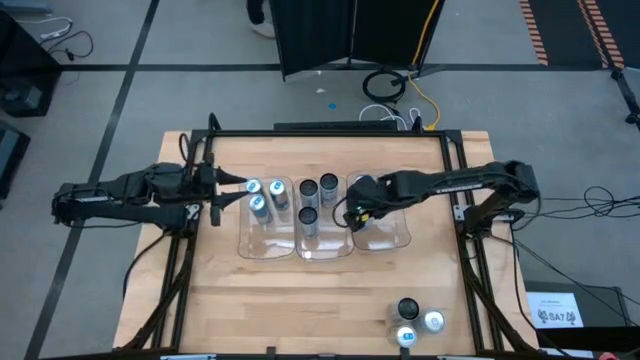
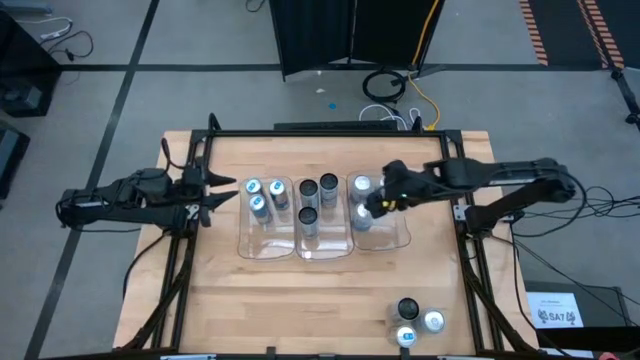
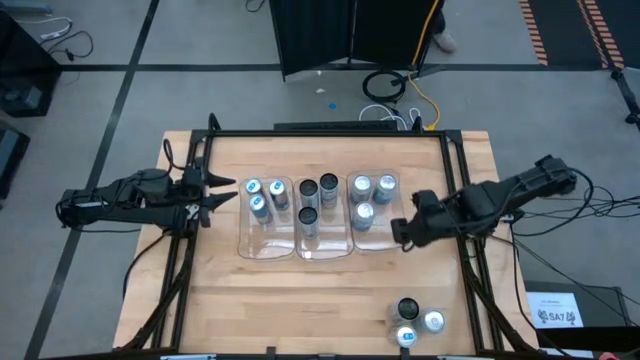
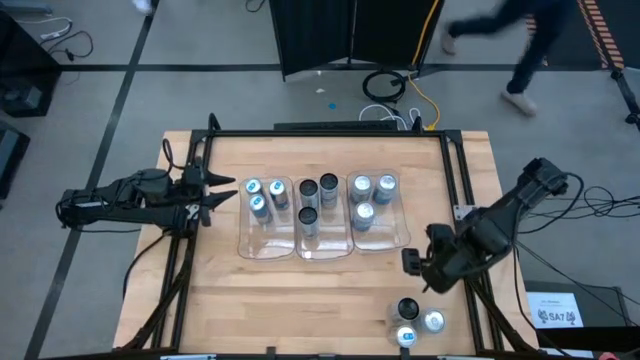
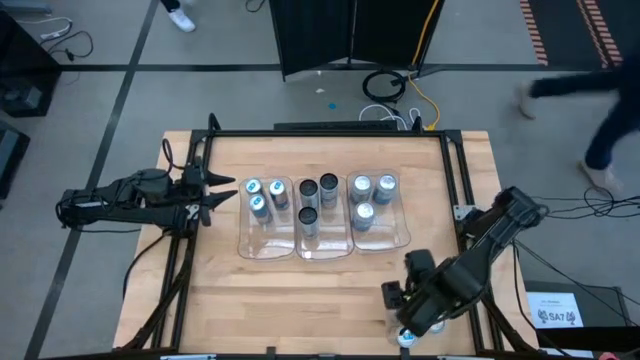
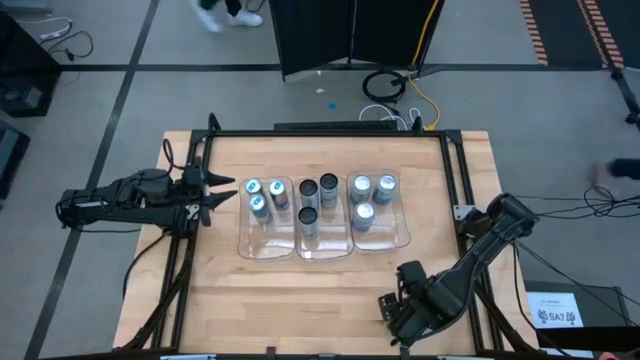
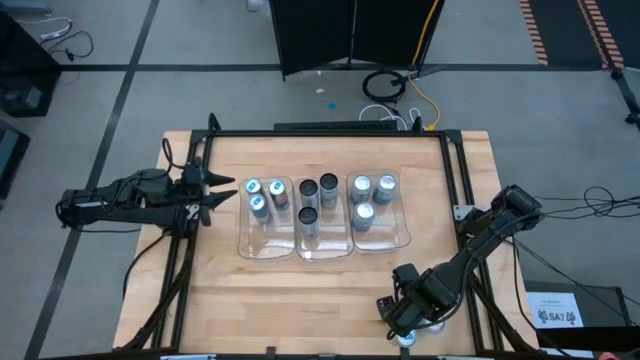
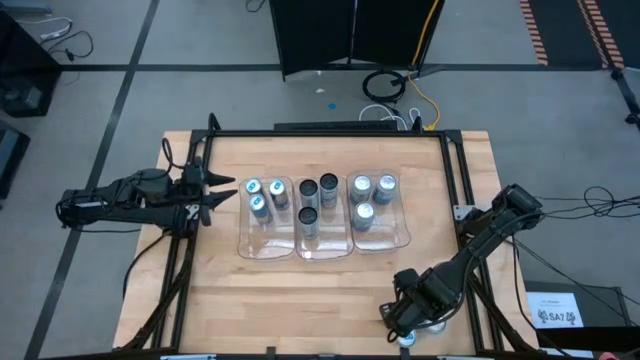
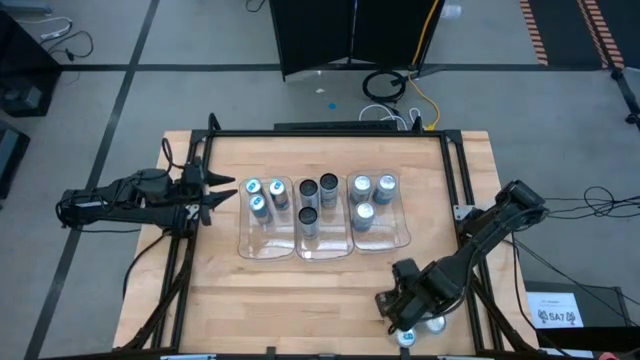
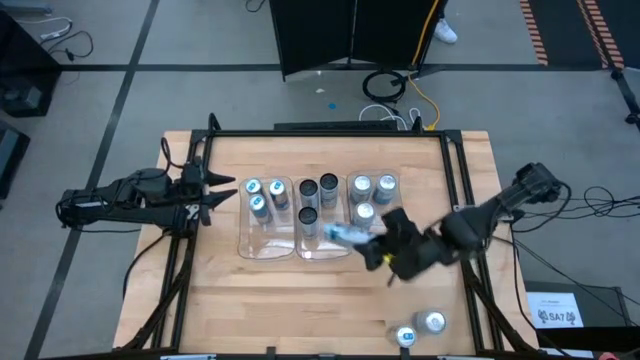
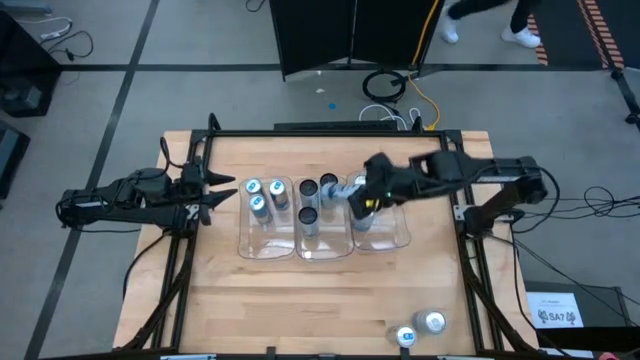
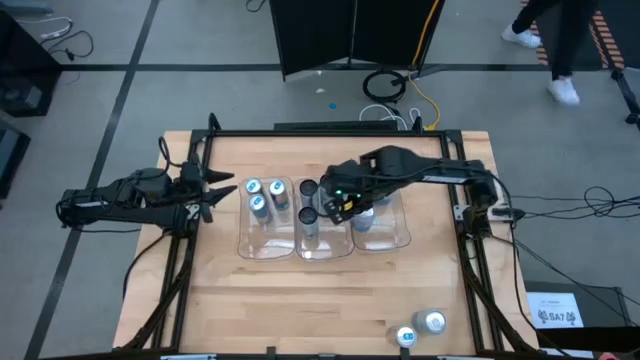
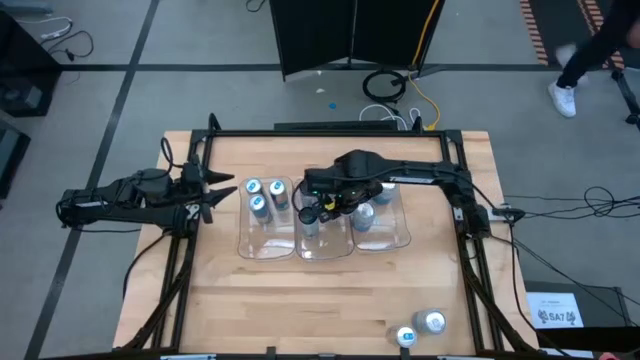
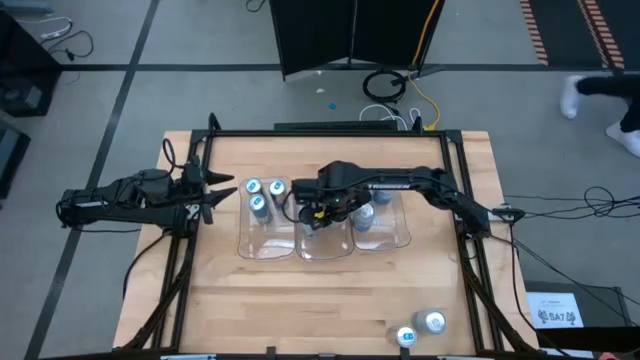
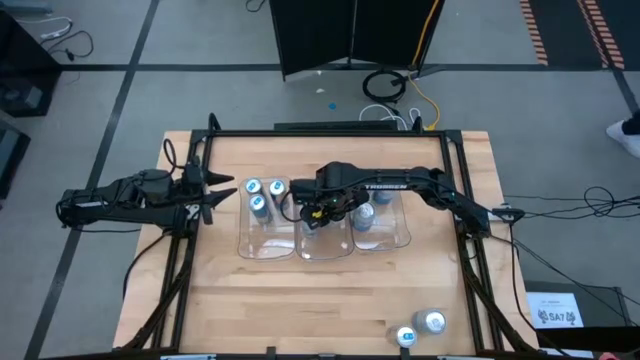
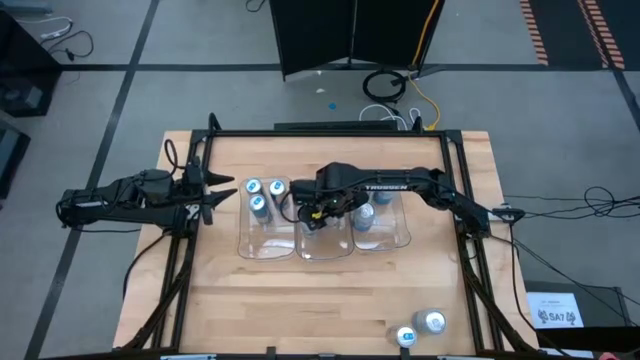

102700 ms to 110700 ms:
Task: Sort soda cans
Put the white-blue soda can into the middle transparent bin

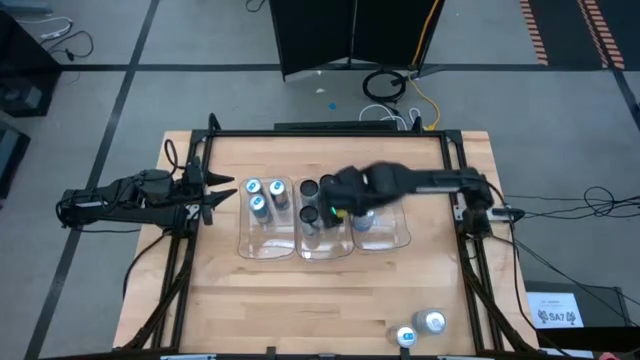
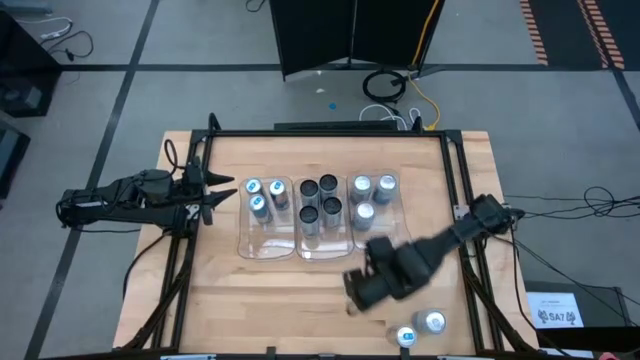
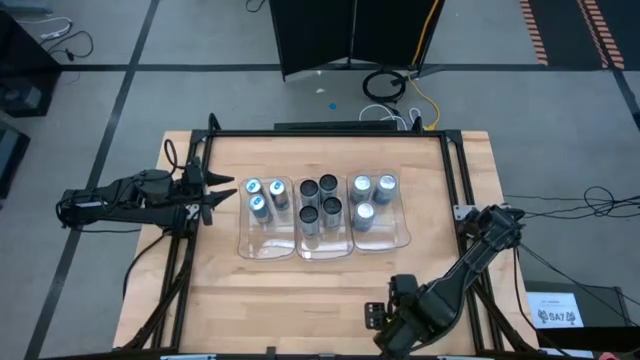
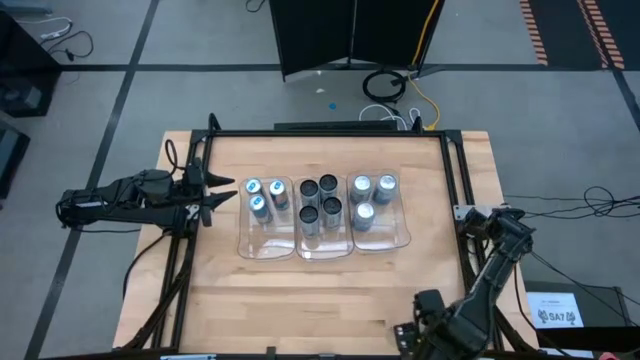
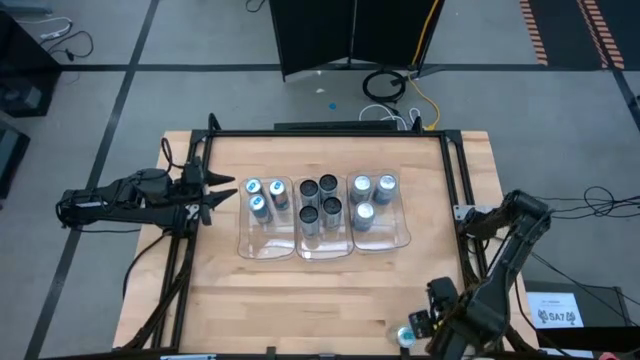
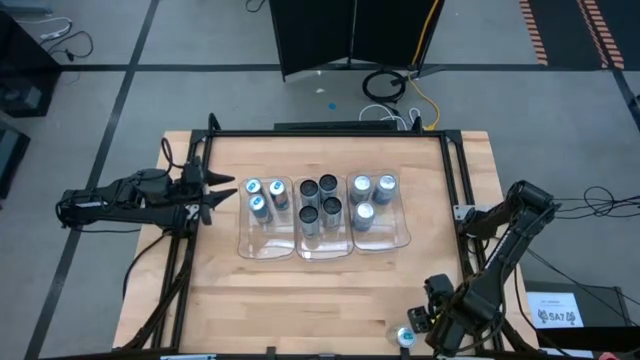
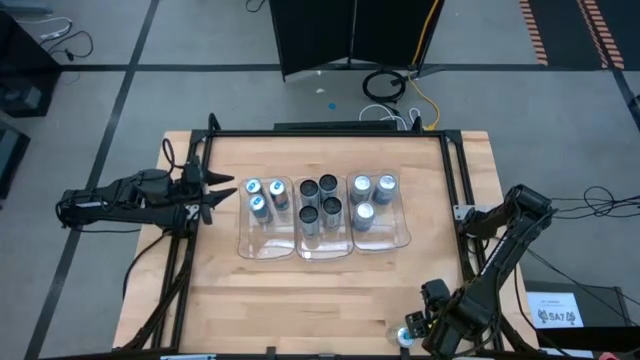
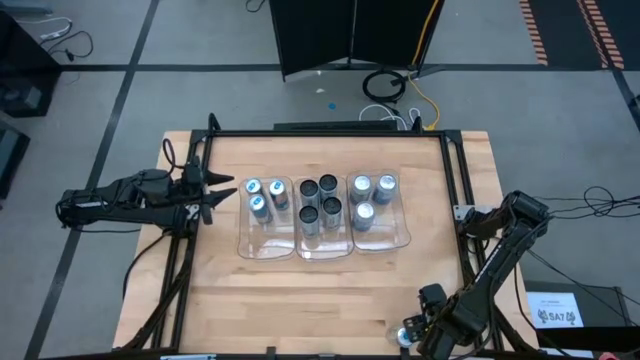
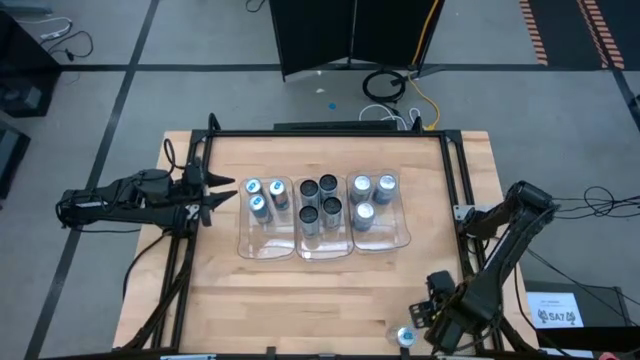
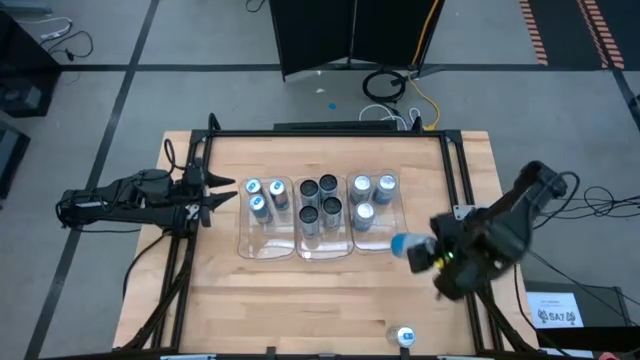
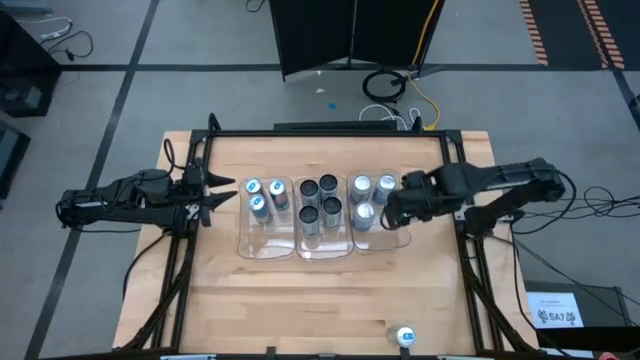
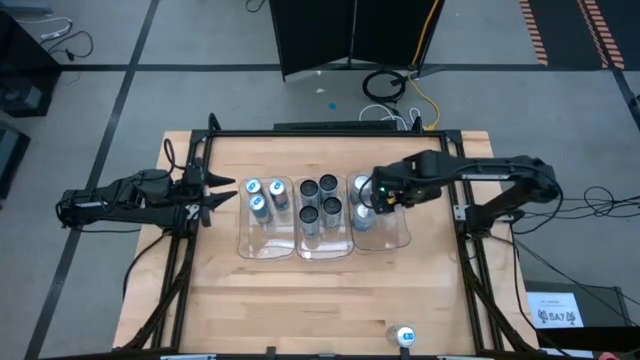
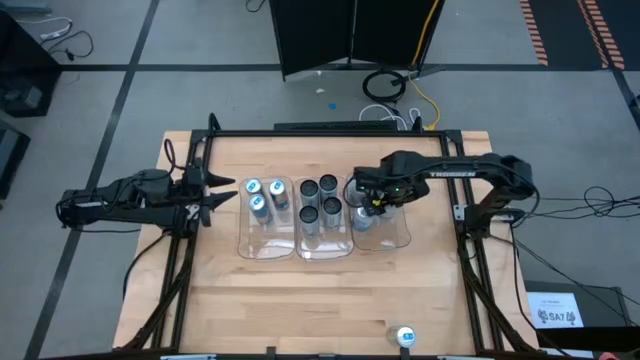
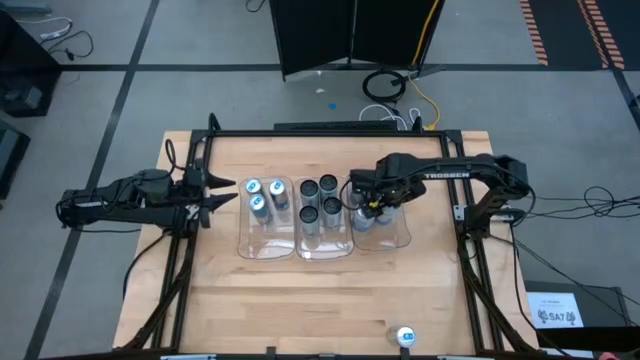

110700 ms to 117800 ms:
Put the blue-white soda can into the right transparent bin

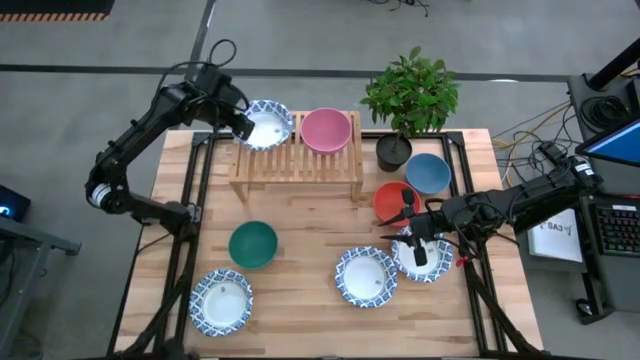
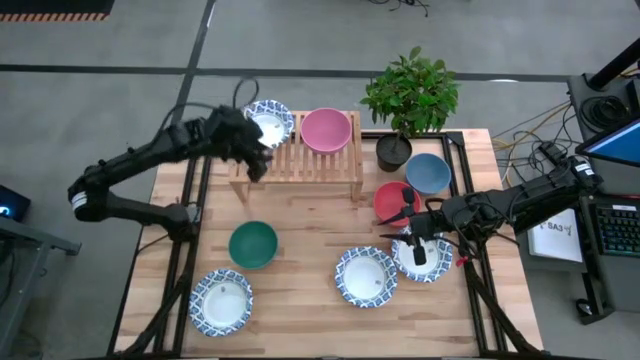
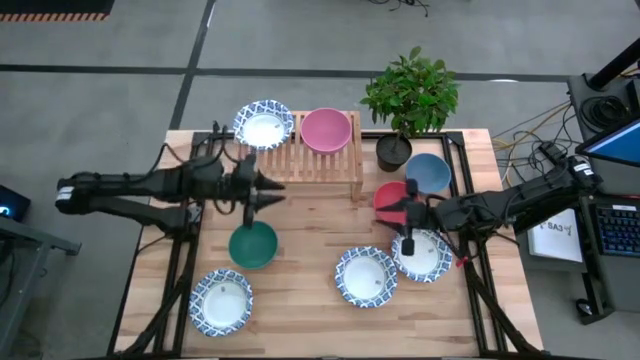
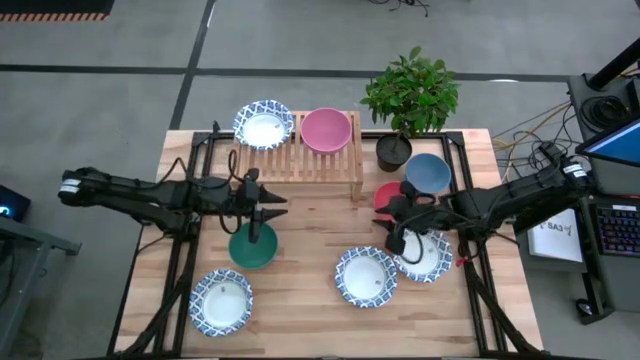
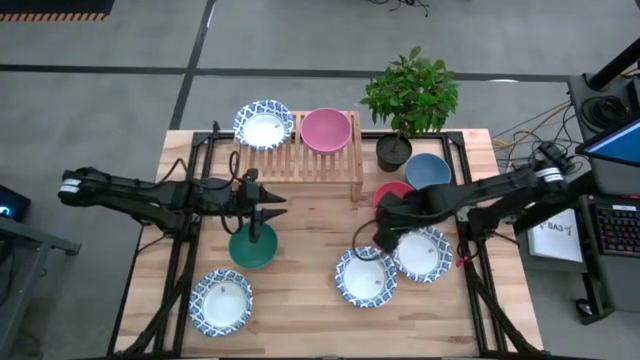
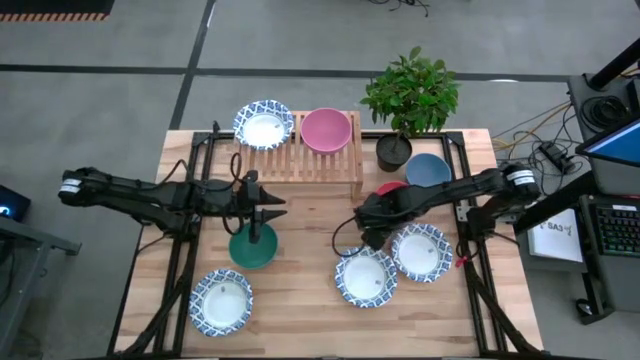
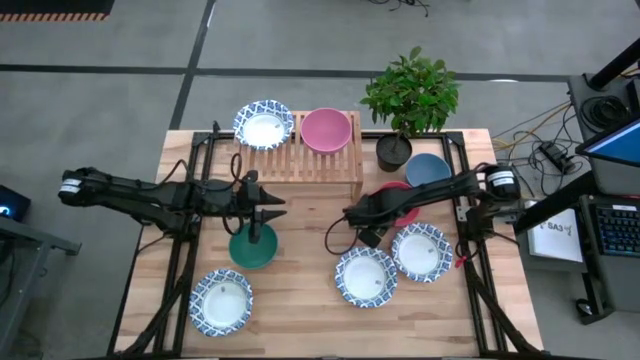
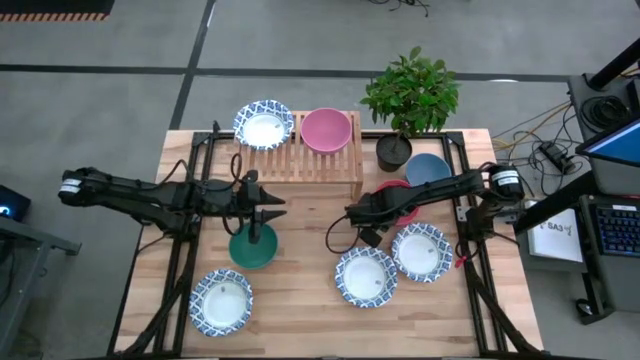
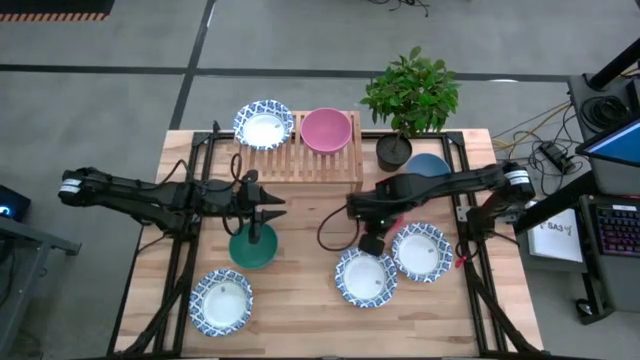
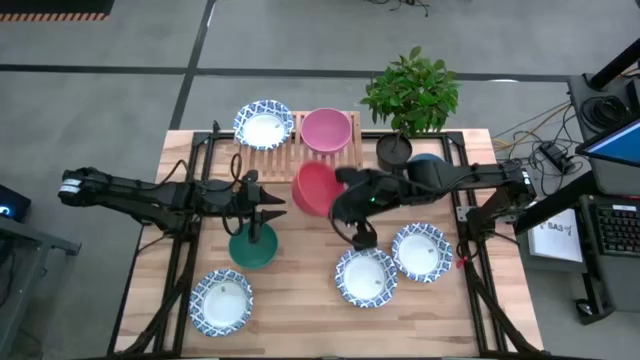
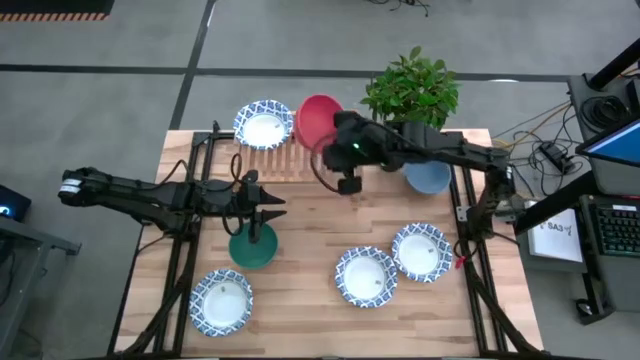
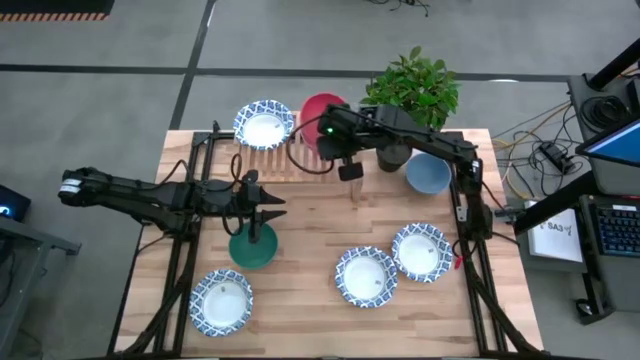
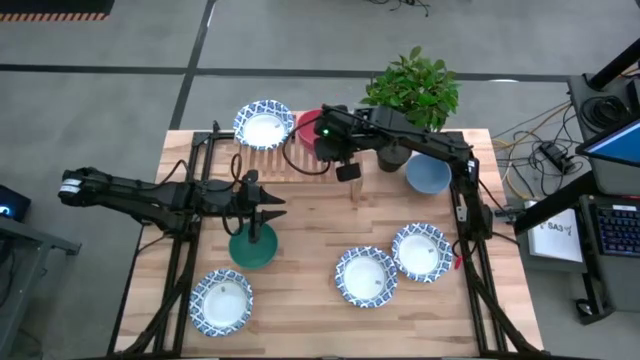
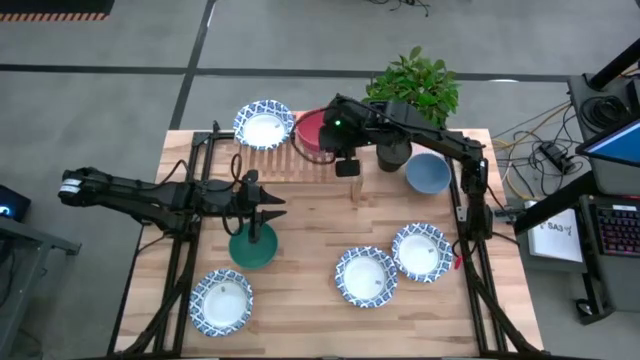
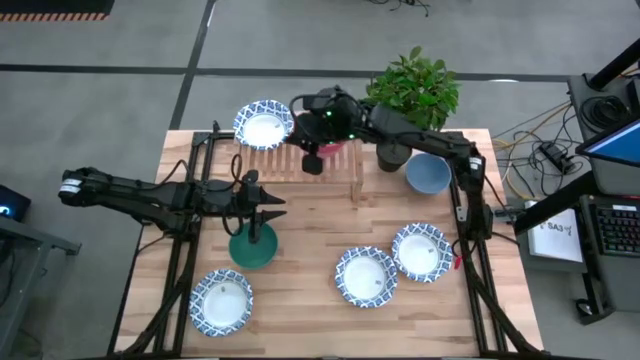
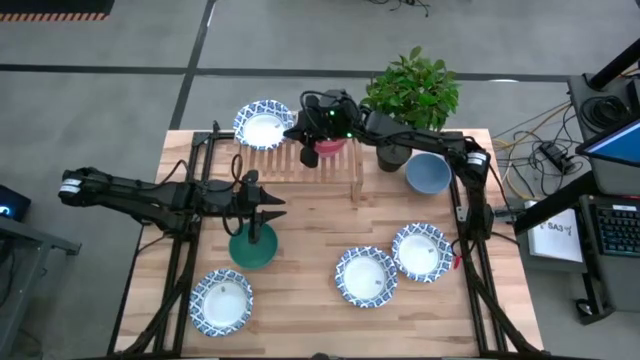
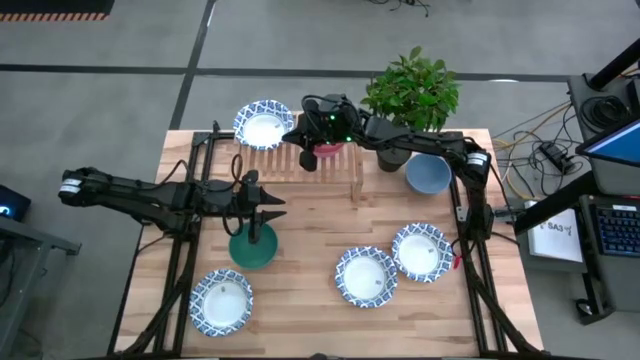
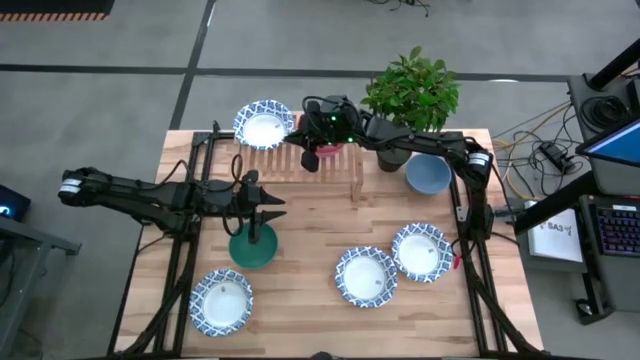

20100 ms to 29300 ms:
Task: Place and stack bowls onto a shelf
Stack the orange bowl on top of the pink bowl on the shelf
